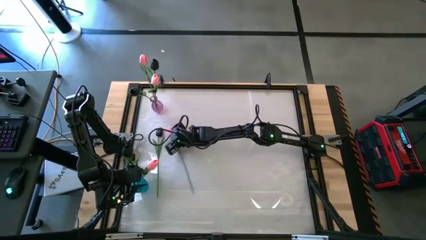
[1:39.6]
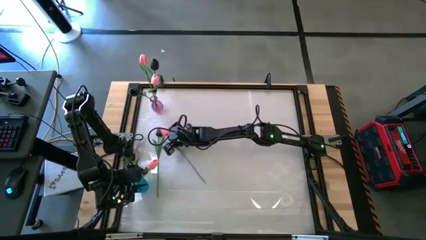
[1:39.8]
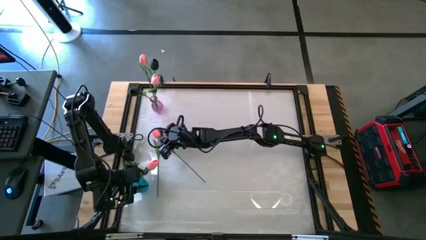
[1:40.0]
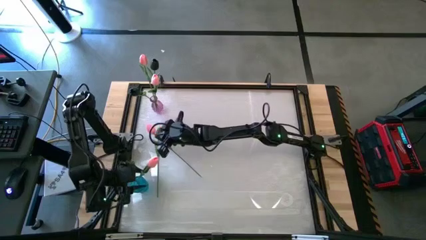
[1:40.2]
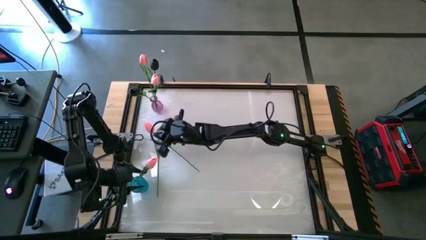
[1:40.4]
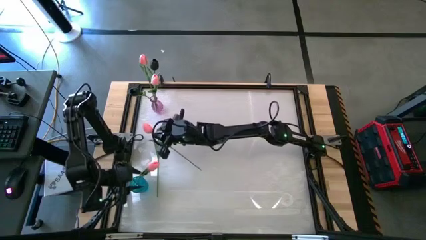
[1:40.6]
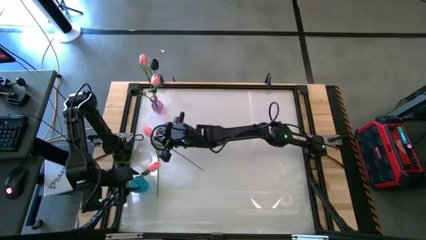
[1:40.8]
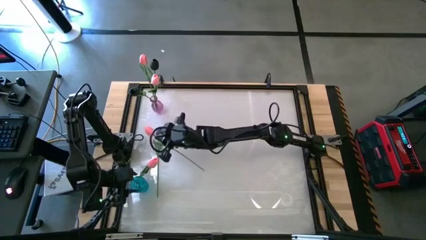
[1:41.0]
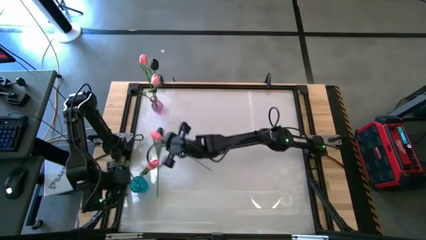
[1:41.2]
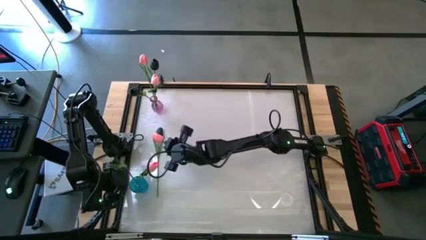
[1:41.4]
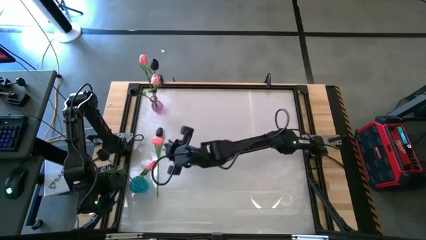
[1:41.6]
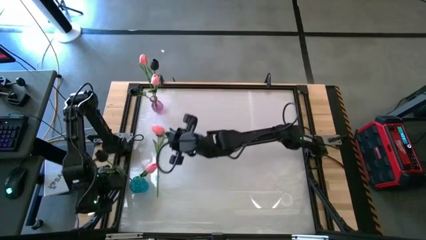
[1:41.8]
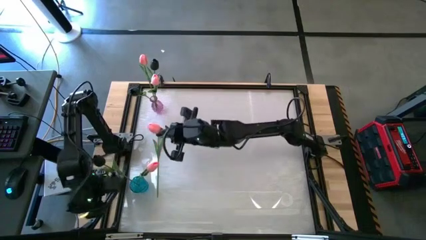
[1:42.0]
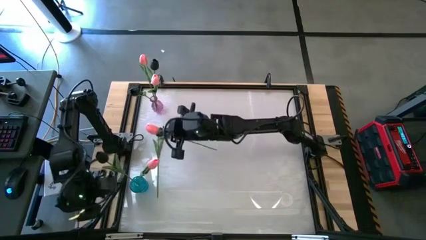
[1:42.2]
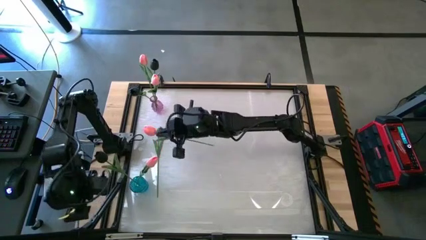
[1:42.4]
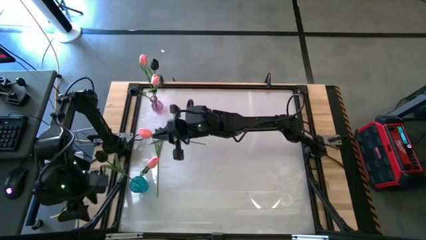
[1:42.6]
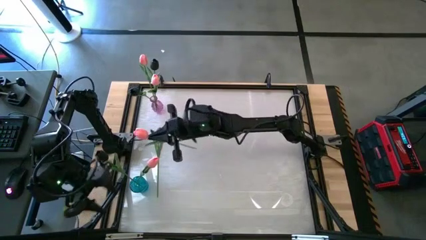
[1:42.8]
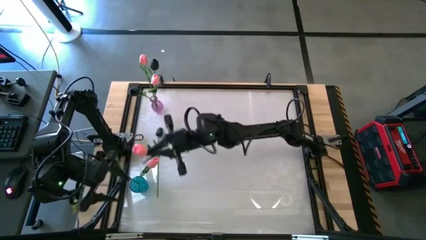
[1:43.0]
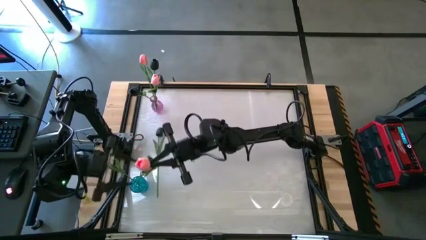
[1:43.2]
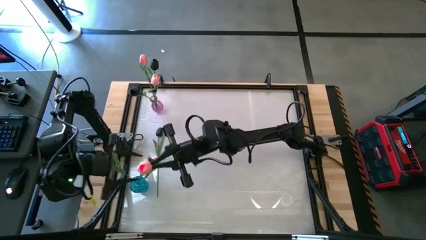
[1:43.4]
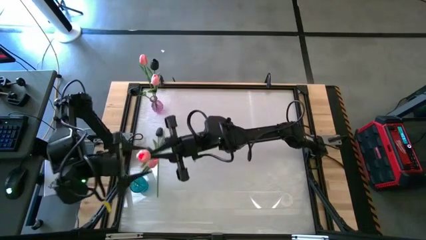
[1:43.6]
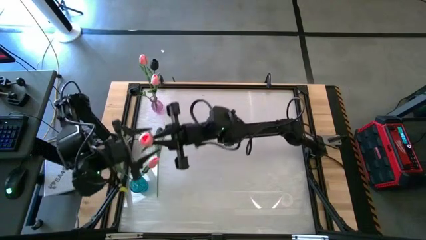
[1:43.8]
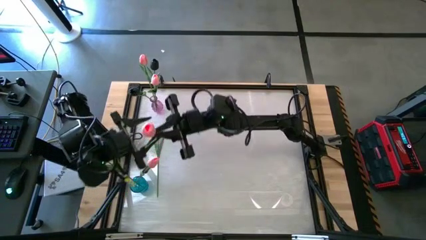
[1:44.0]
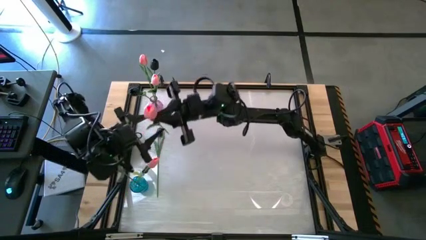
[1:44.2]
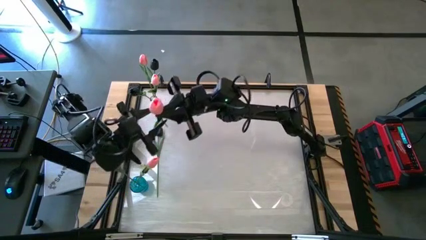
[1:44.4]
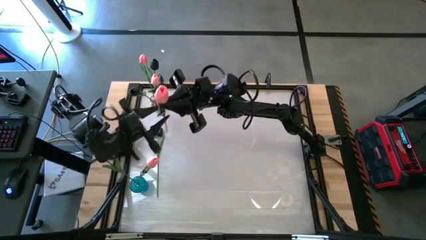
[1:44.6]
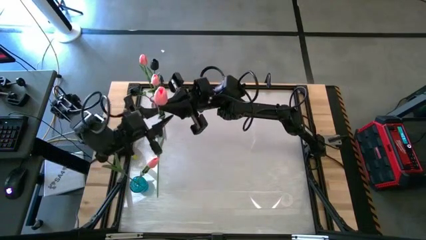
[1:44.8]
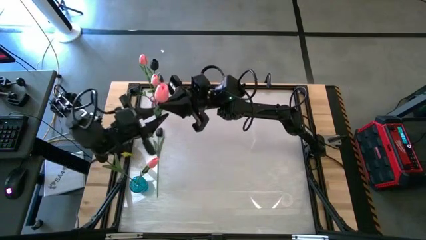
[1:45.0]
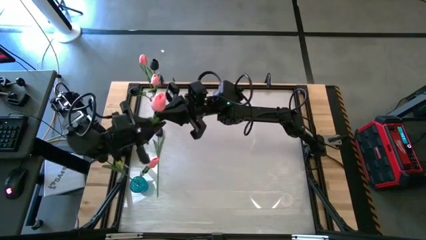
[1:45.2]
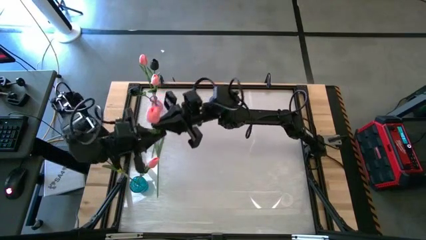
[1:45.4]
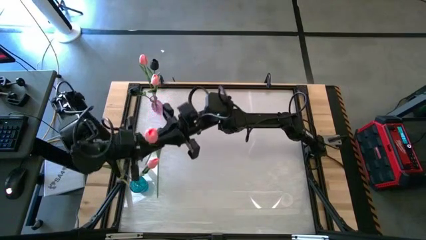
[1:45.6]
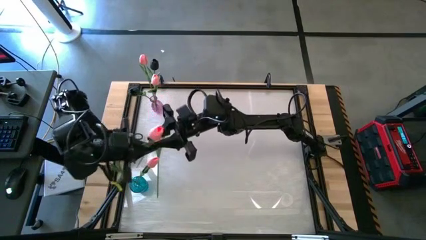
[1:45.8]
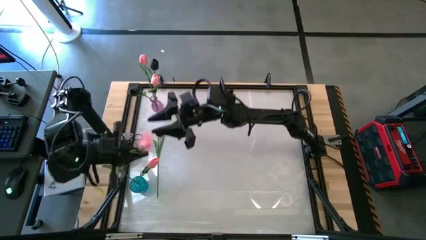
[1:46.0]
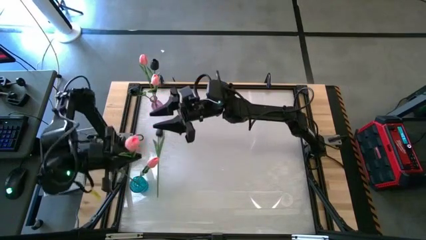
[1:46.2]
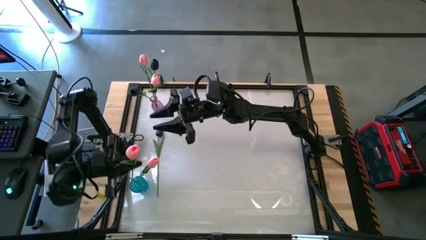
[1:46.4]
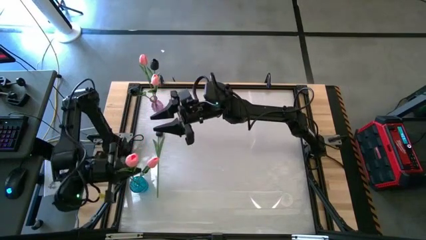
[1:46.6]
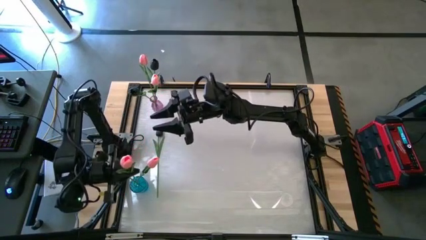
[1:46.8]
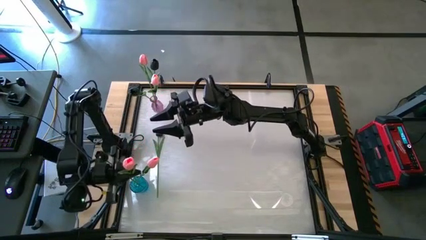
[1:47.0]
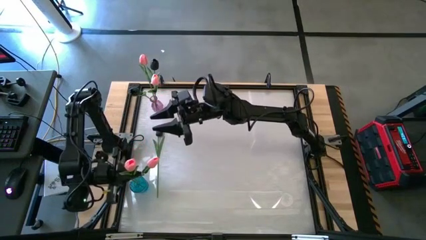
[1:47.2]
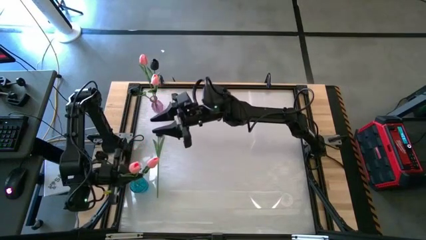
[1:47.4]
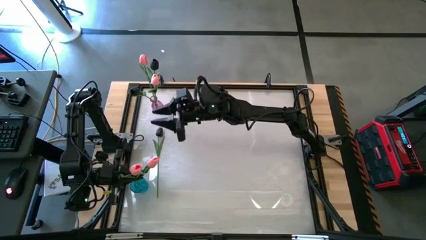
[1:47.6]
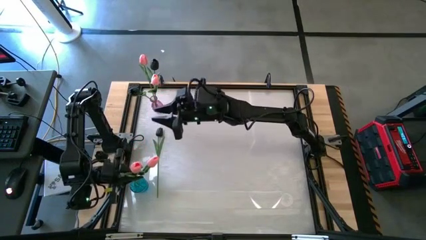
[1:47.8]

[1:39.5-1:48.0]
Task: Sort flowers into vase by color
Put the pink flower into the blue glass vase

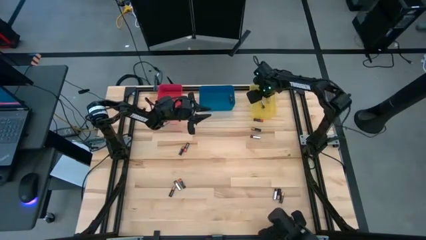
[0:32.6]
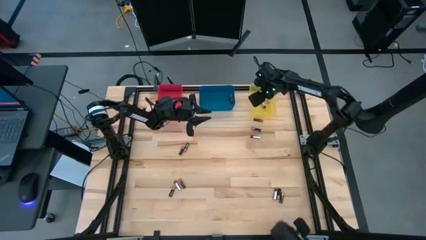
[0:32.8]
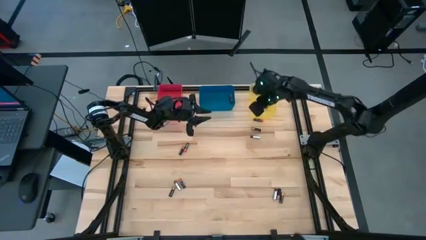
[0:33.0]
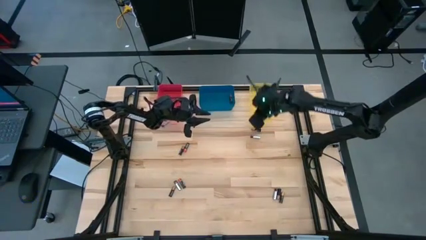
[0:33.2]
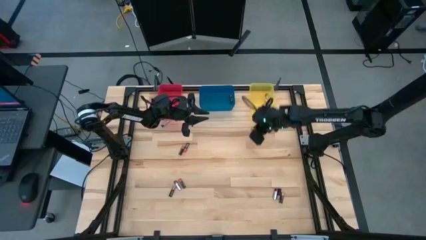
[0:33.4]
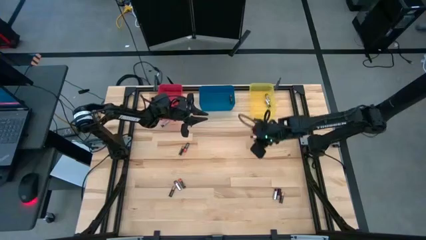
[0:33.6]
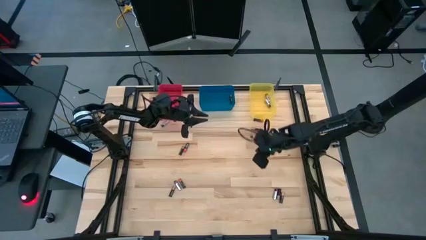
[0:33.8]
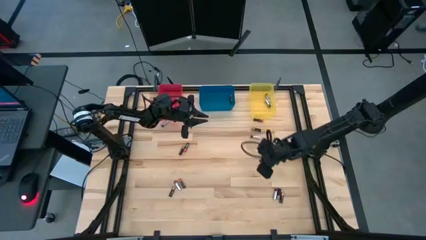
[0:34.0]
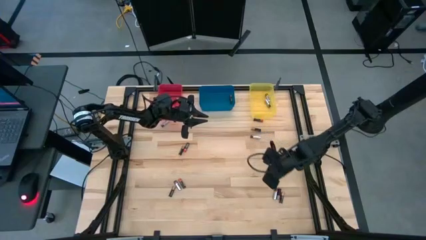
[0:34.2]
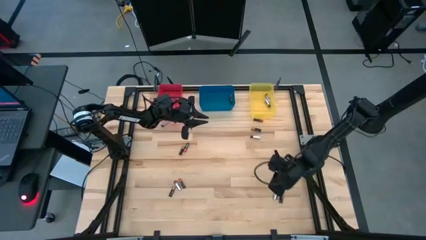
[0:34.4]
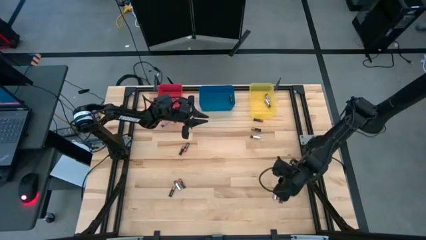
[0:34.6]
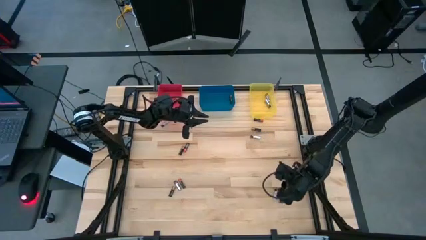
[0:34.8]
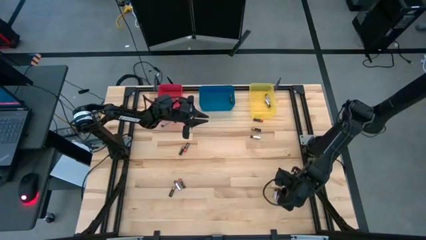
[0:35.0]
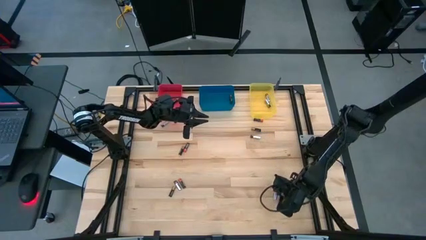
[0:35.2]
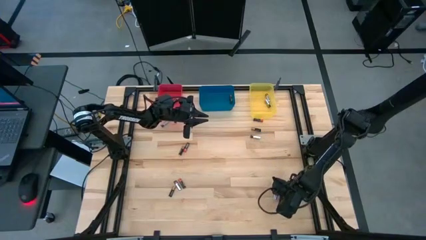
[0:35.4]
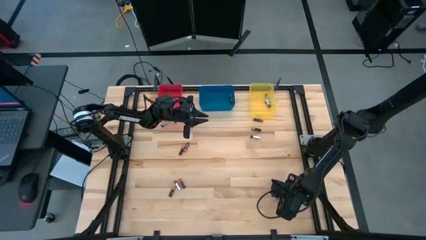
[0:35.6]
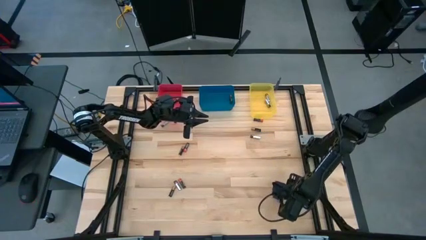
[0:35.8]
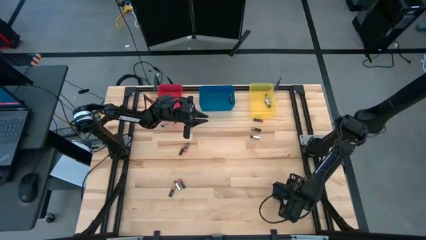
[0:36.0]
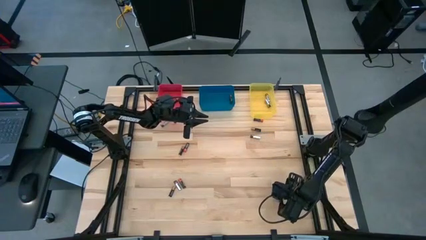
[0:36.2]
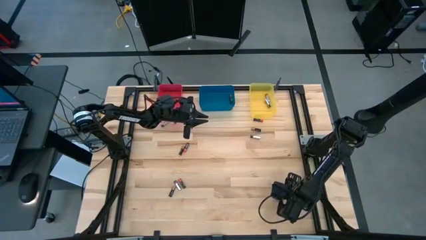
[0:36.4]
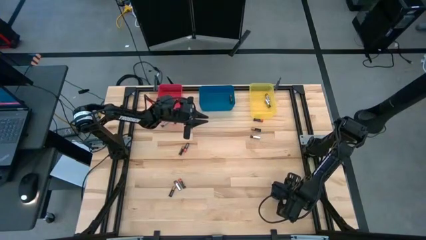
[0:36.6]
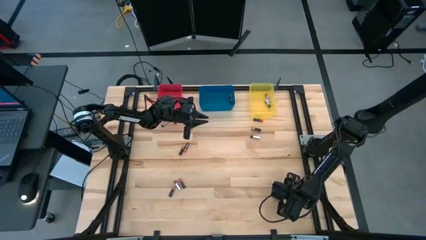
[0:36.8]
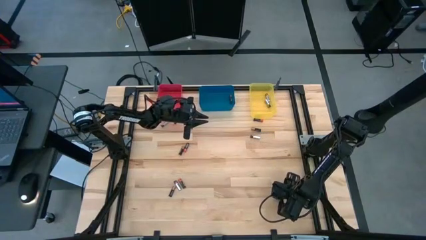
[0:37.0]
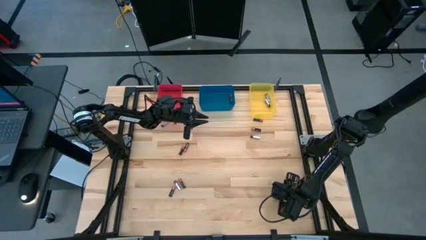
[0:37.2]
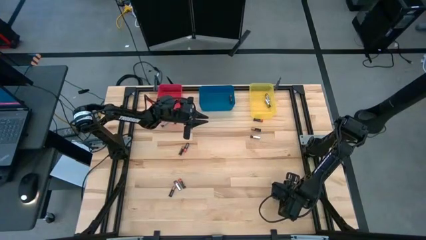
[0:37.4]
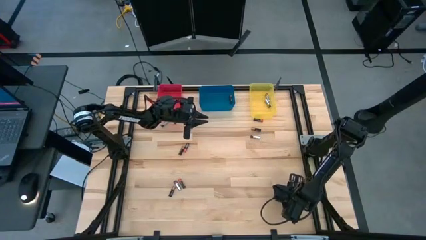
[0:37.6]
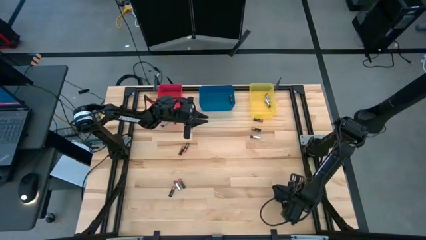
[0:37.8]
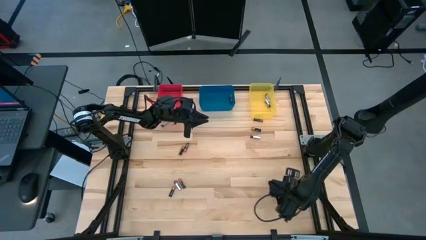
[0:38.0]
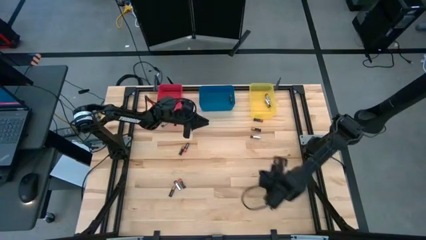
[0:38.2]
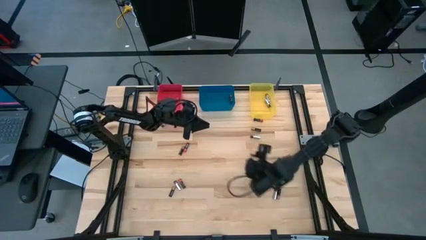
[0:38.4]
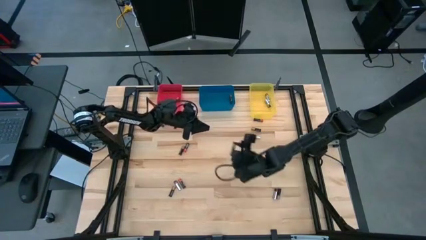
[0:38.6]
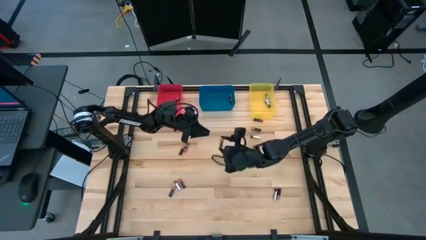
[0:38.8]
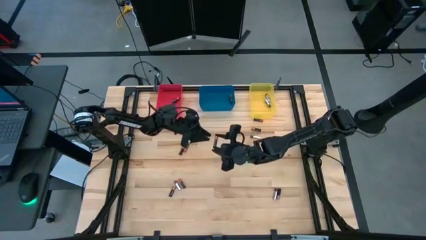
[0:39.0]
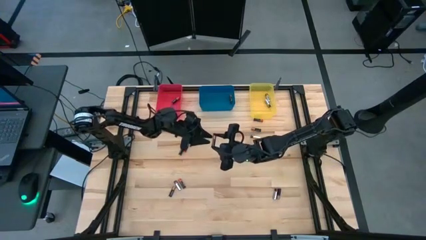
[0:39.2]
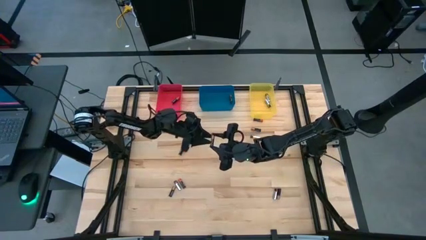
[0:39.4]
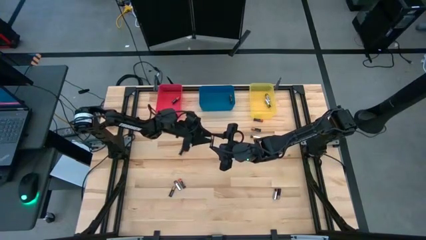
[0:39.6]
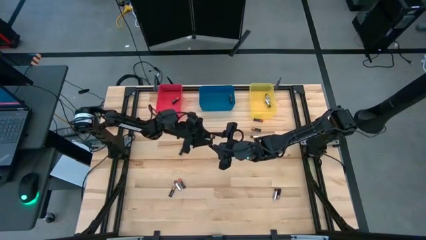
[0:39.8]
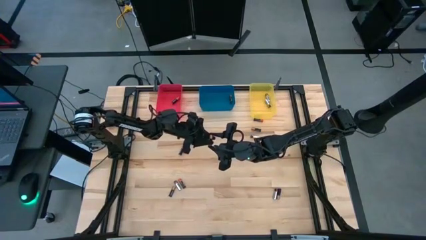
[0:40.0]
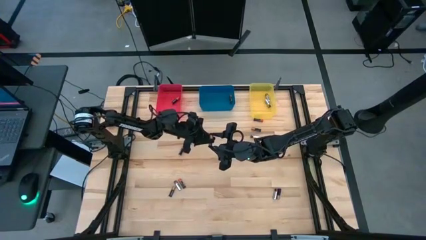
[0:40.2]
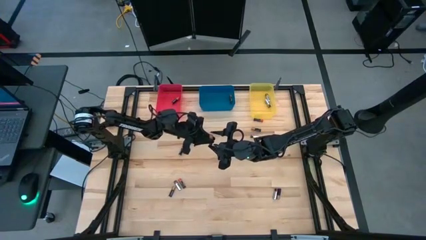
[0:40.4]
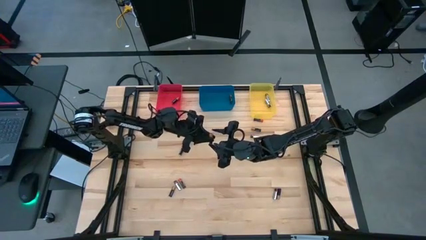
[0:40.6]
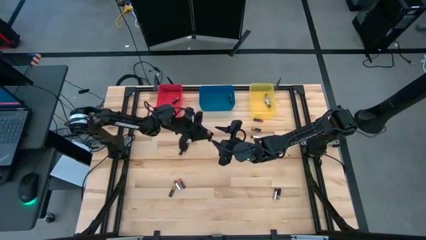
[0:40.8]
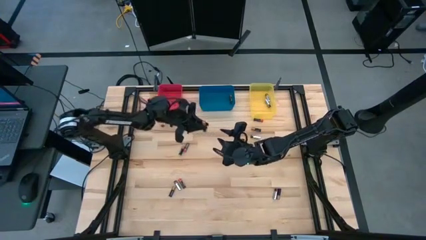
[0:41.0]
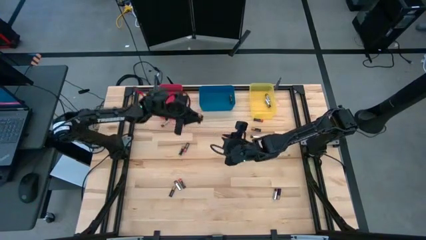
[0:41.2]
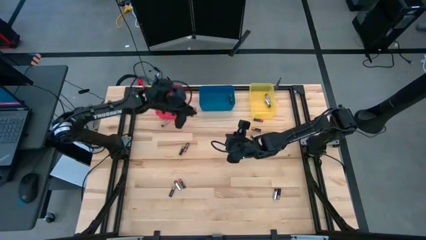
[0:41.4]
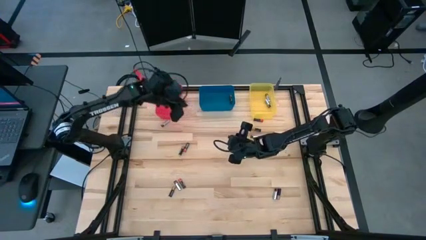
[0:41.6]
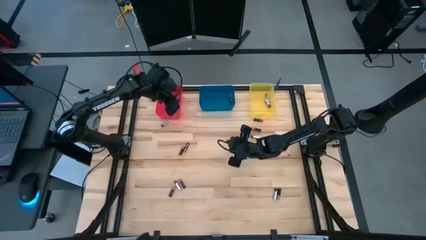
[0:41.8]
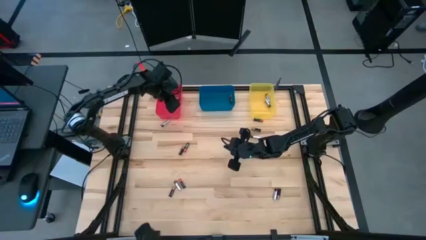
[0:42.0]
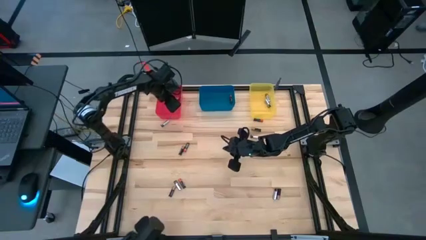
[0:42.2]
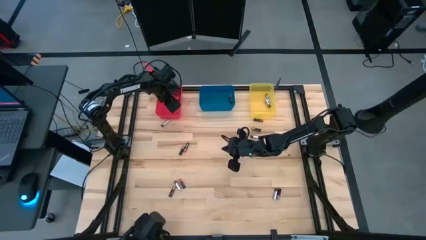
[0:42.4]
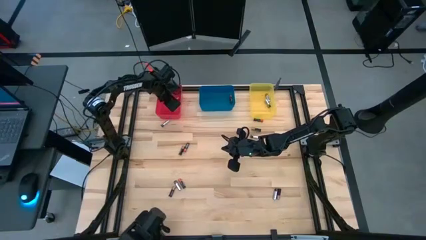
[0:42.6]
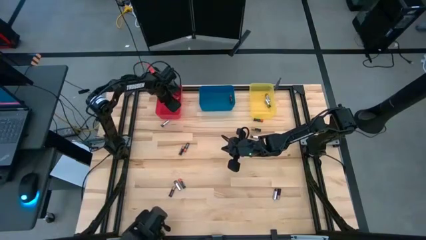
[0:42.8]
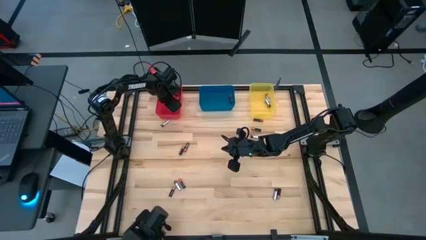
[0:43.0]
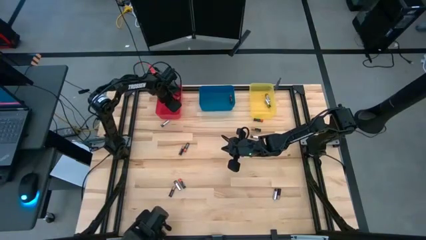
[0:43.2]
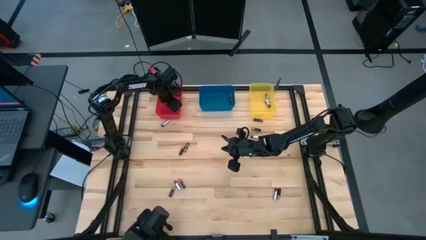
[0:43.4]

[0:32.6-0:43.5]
Task: Sort batteries
Put the brown battery into the red bin
